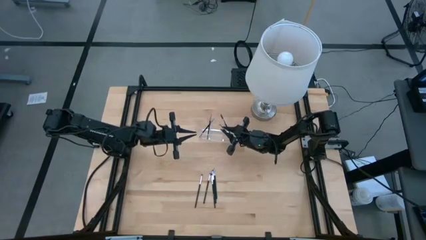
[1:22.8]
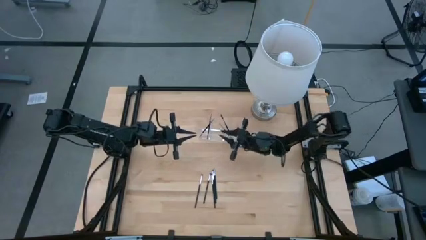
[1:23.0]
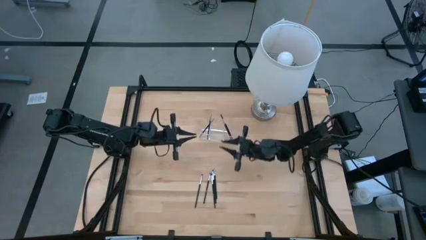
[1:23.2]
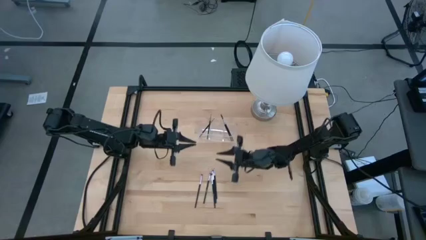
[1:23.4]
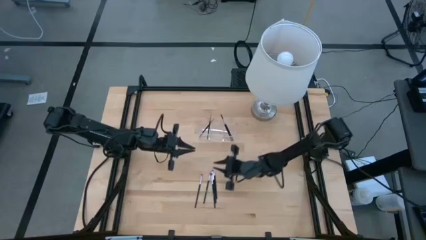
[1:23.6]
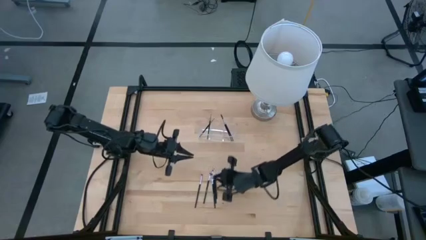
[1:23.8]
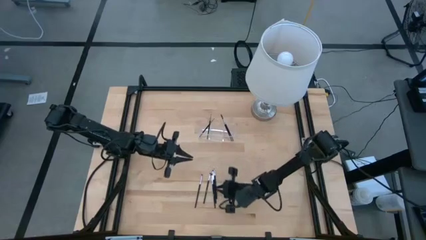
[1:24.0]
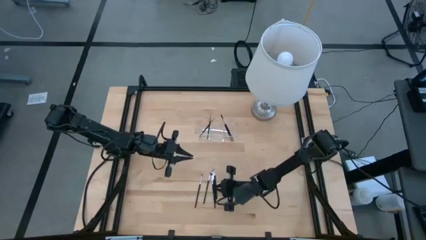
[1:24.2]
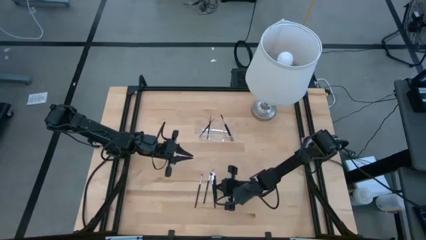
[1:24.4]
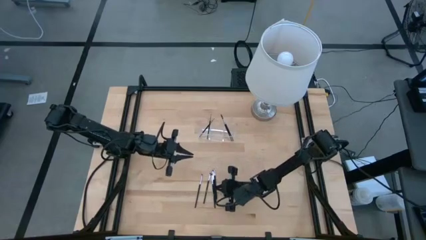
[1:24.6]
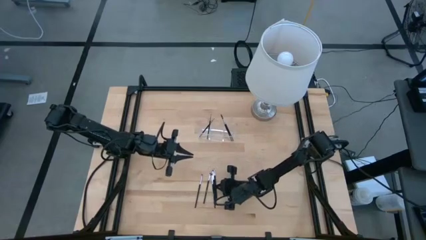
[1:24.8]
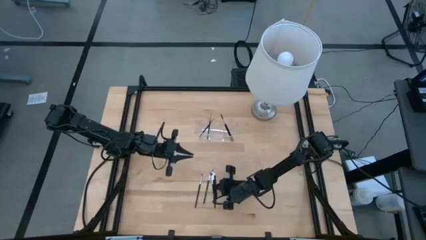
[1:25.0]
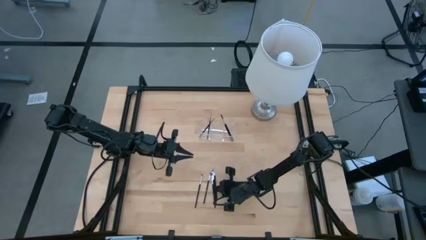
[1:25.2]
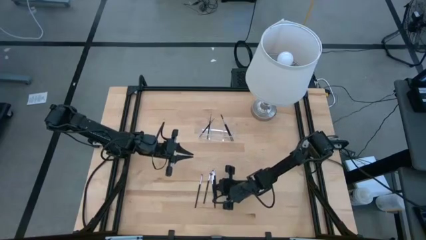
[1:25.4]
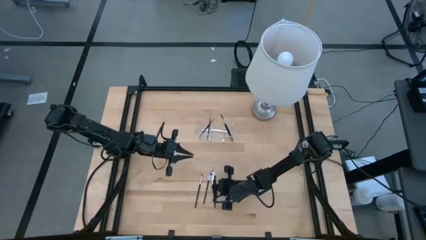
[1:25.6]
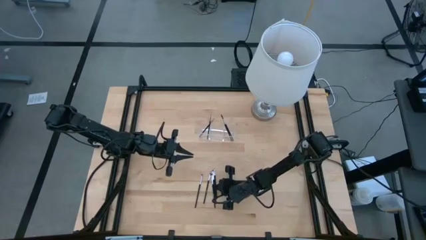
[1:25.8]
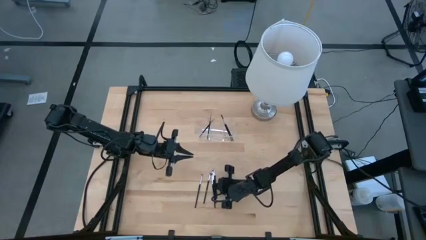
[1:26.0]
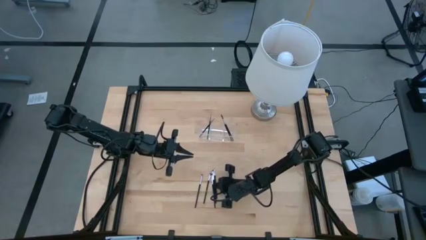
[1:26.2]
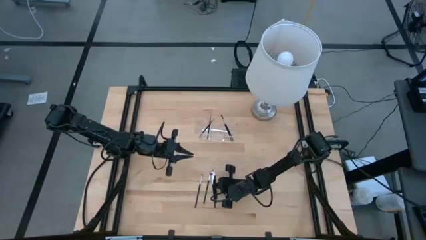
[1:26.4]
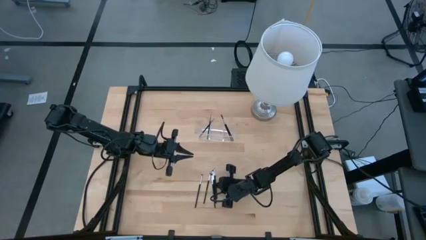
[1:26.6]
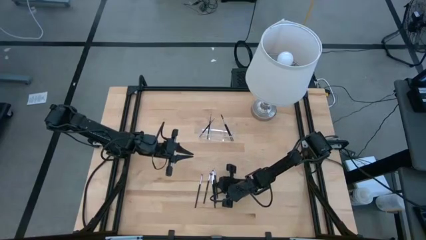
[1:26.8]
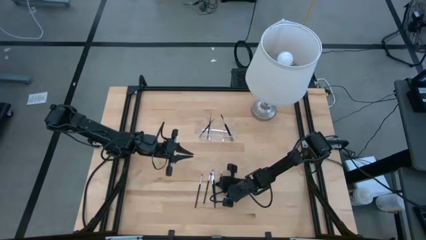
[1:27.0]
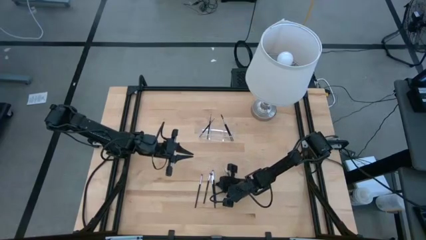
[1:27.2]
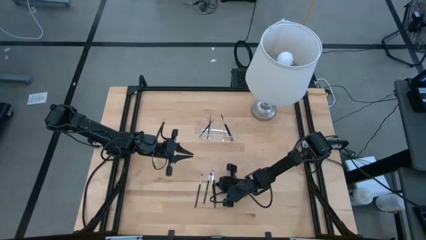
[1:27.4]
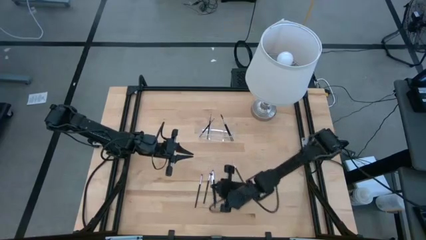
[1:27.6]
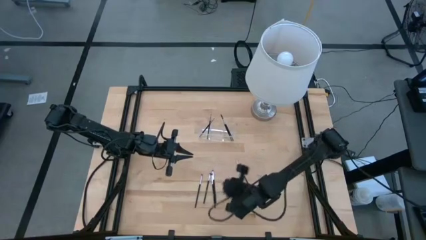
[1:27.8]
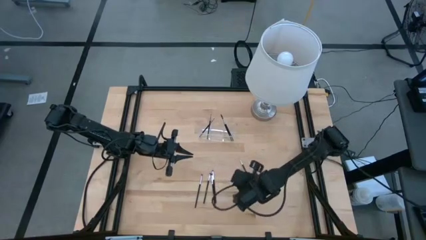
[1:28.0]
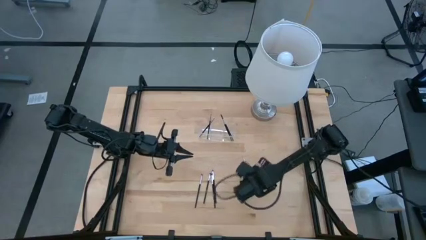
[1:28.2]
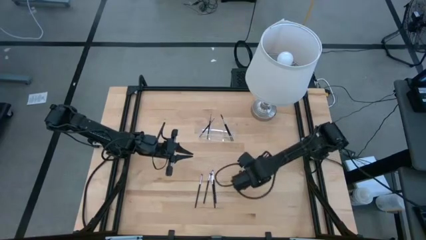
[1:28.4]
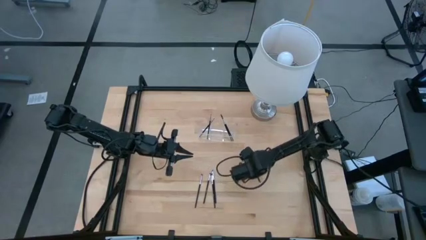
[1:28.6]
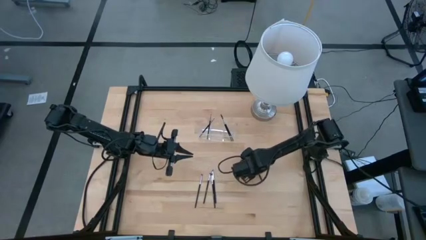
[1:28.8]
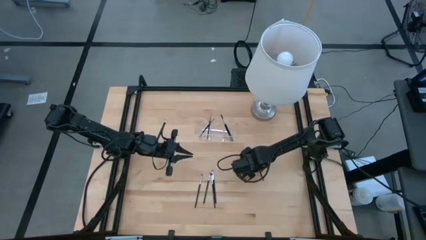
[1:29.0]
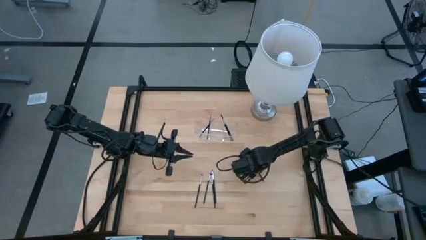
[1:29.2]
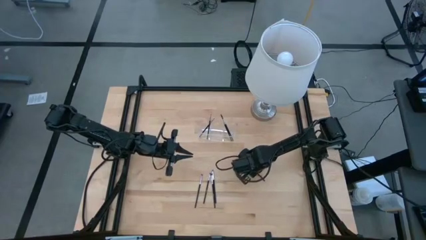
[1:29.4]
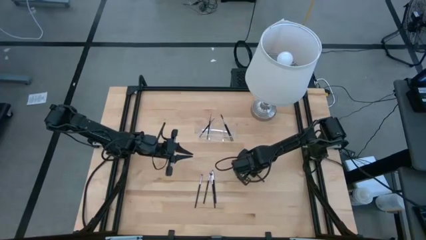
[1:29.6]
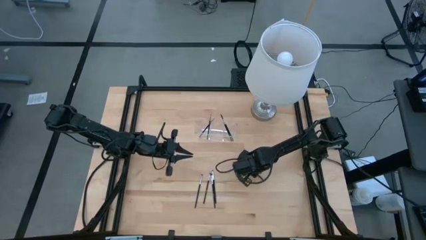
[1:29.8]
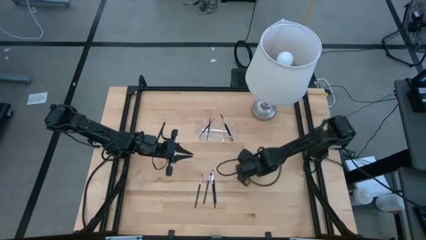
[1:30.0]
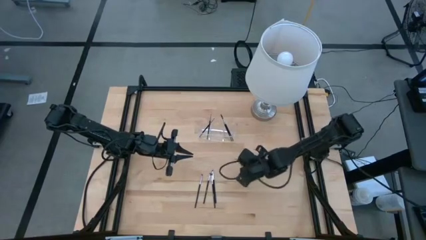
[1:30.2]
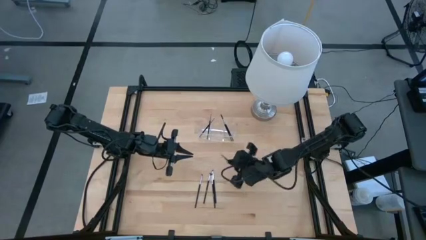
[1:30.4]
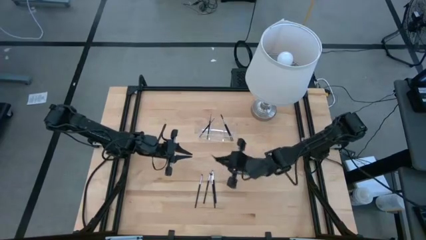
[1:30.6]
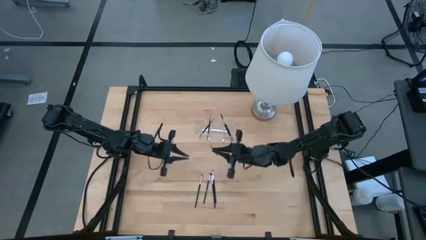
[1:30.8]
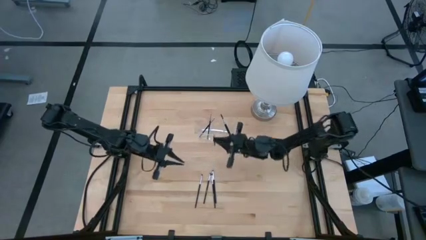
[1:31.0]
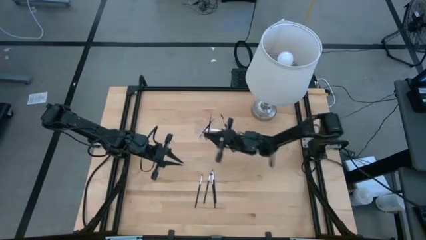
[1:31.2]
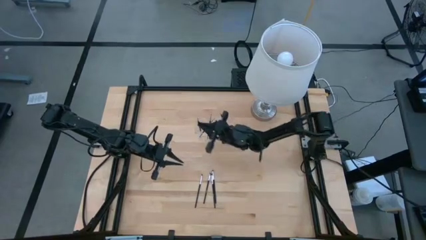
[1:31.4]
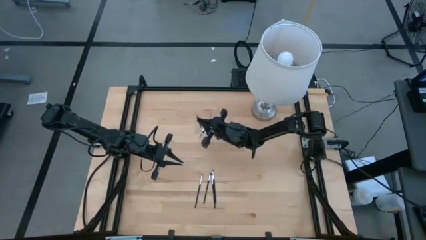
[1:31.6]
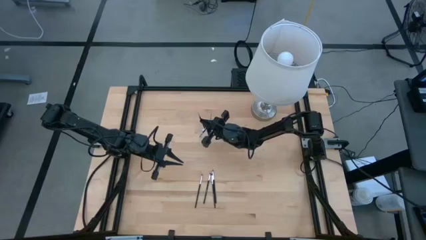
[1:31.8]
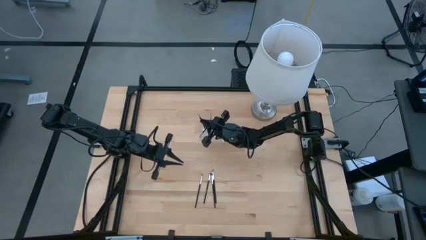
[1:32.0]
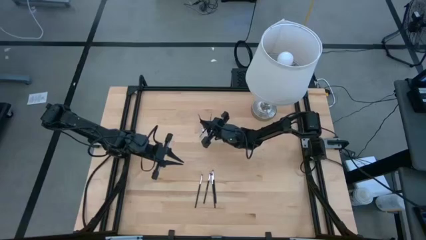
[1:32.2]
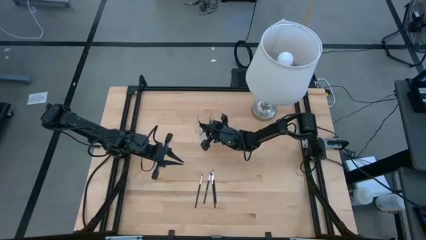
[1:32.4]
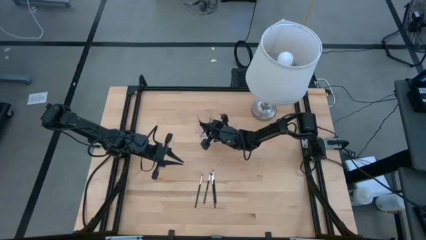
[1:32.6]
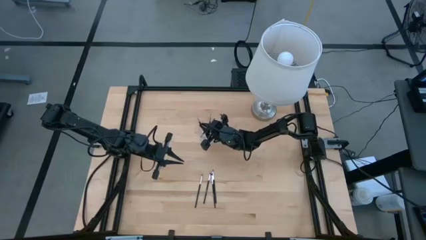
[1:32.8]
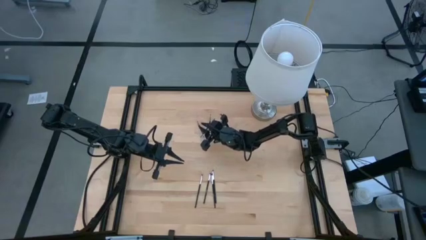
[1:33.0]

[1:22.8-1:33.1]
Task: Put items in baskets/containers
Put the black liner brush transparent organizer

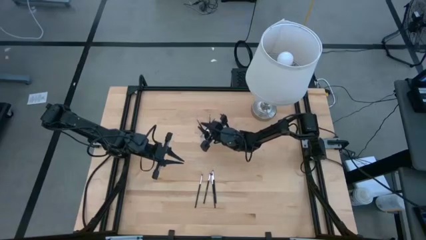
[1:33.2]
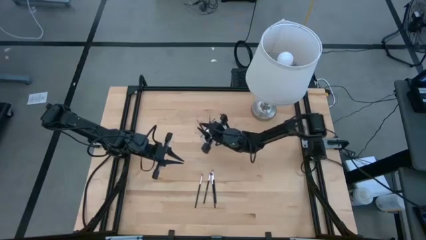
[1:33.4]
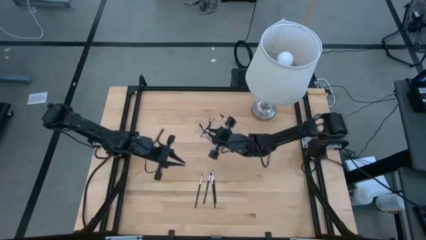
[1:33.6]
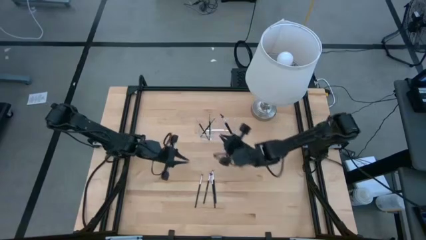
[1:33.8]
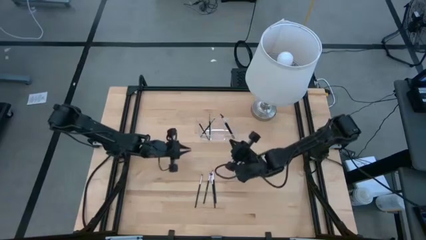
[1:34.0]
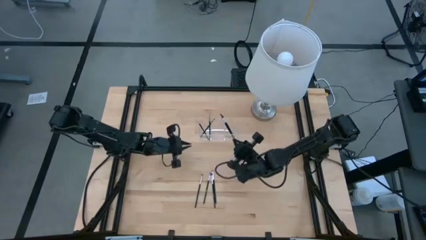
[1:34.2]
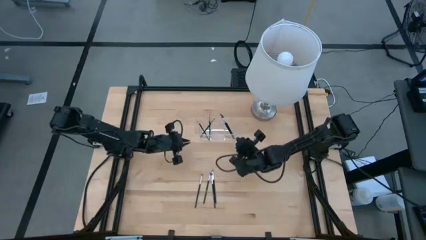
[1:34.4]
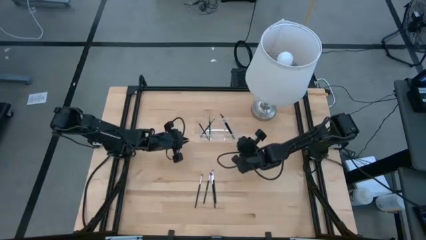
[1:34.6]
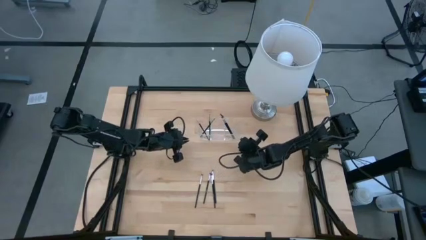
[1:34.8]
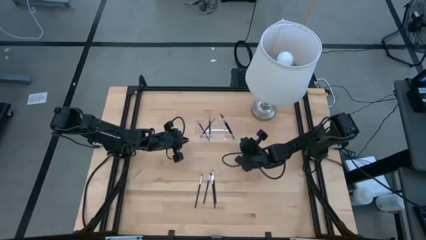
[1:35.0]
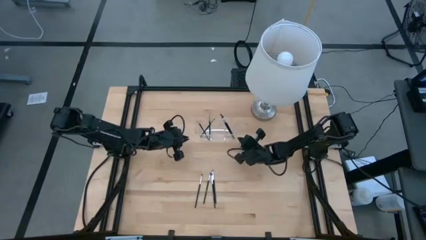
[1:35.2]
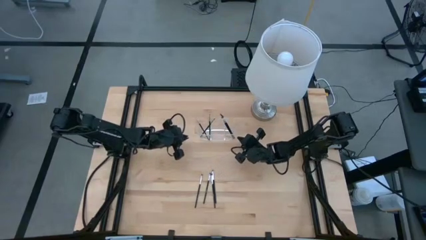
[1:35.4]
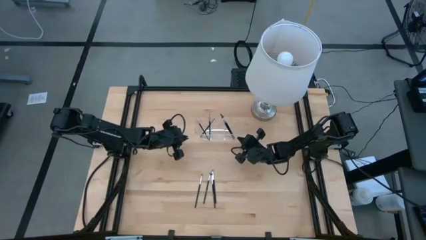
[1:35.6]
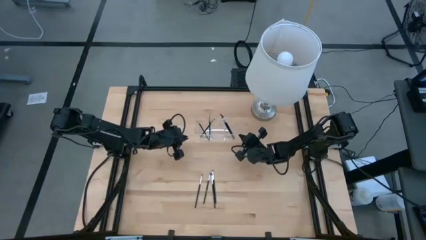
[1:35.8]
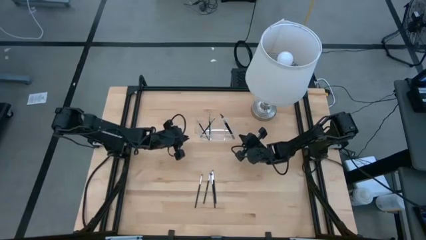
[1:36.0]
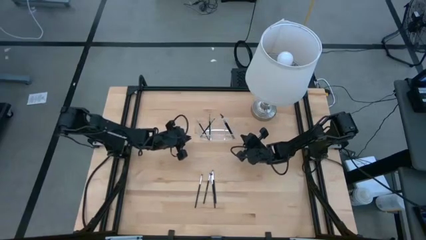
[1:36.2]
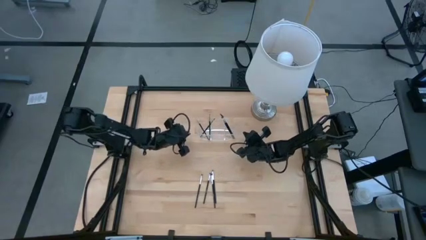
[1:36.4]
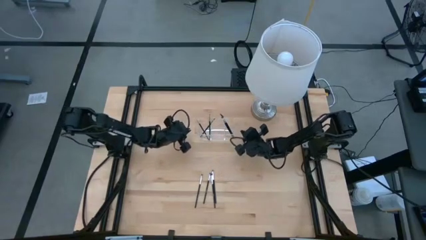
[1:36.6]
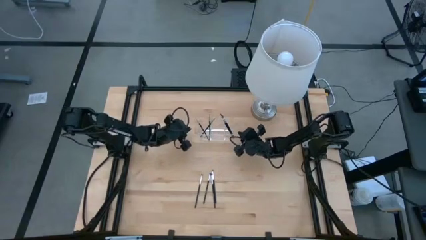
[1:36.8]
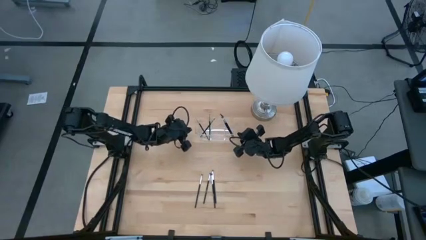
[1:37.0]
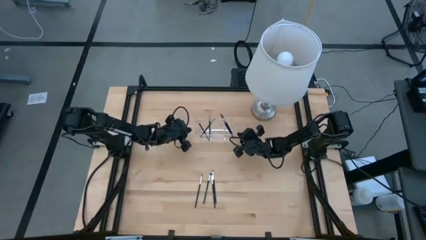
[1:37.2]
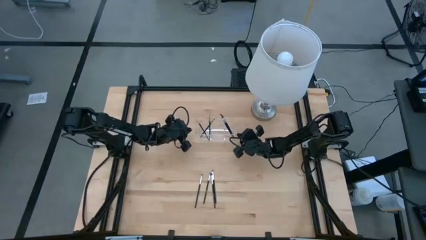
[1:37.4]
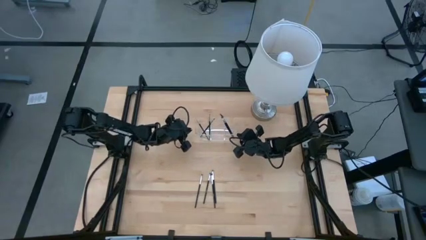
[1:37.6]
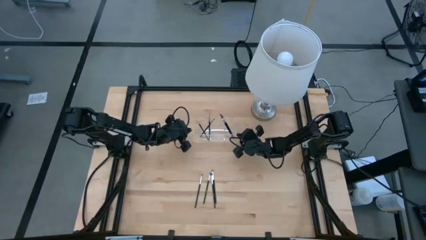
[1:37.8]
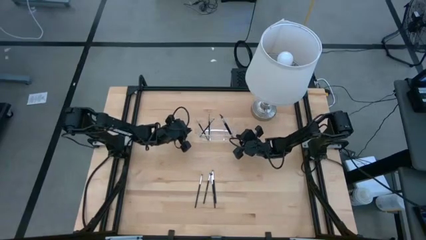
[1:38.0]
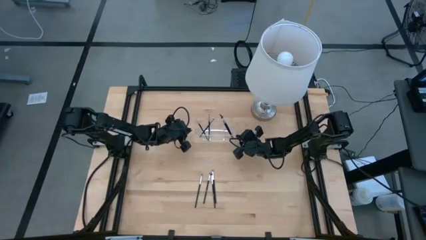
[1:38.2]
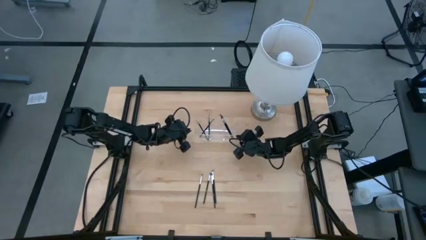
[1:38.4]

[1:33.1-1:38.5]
Adjust the transparent organizer
